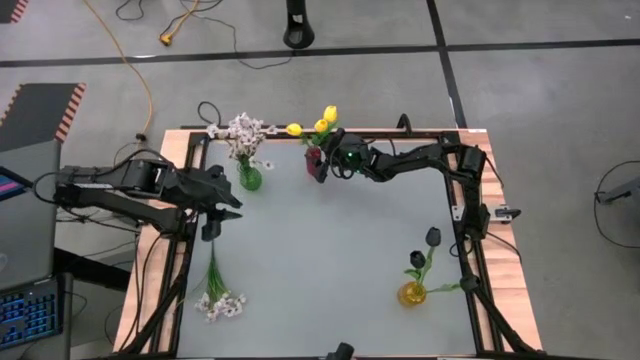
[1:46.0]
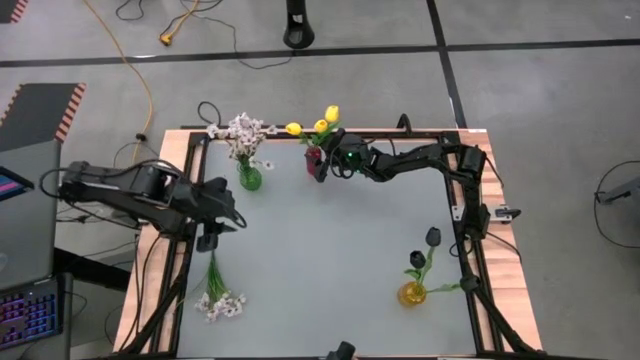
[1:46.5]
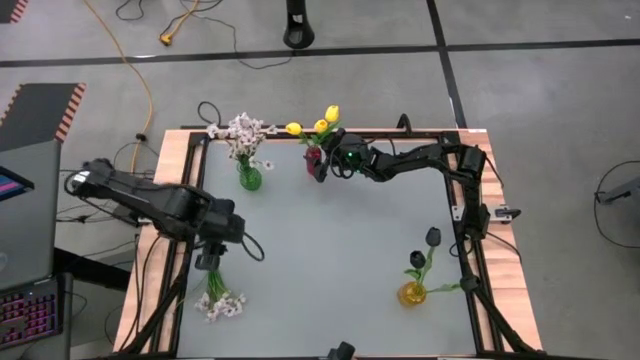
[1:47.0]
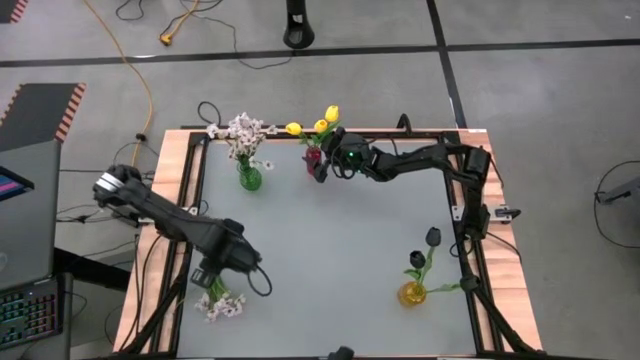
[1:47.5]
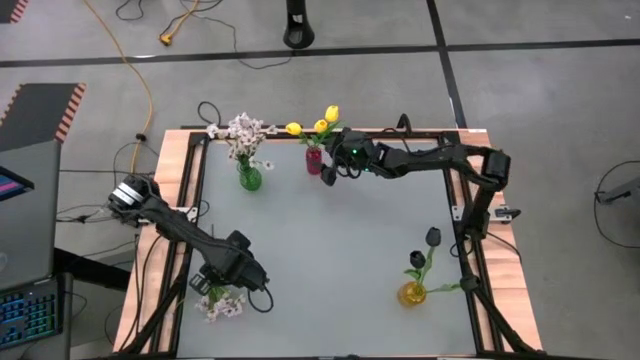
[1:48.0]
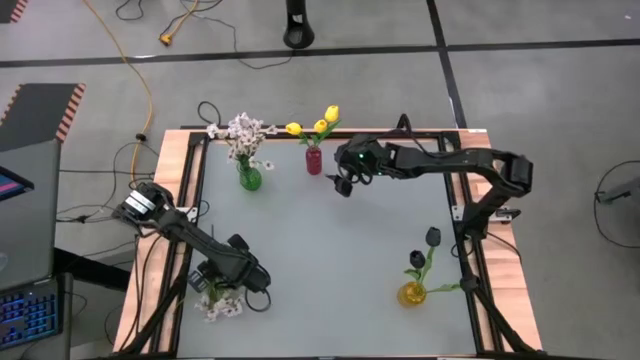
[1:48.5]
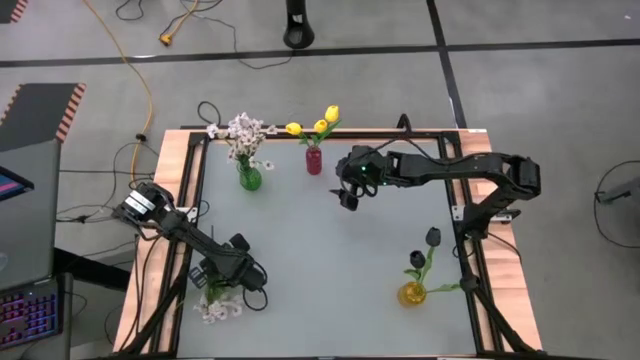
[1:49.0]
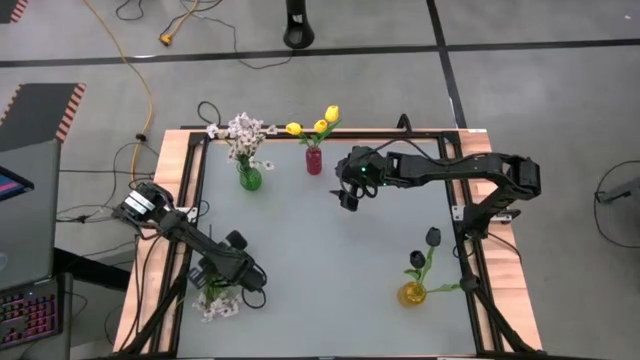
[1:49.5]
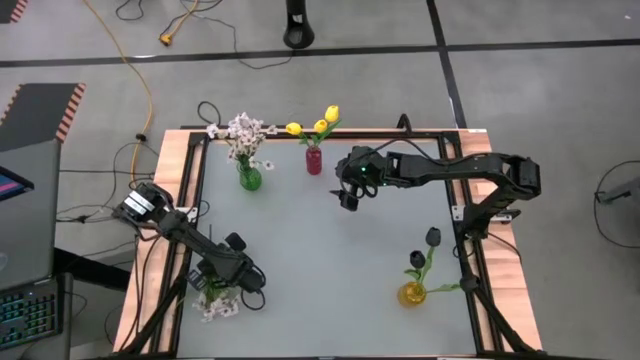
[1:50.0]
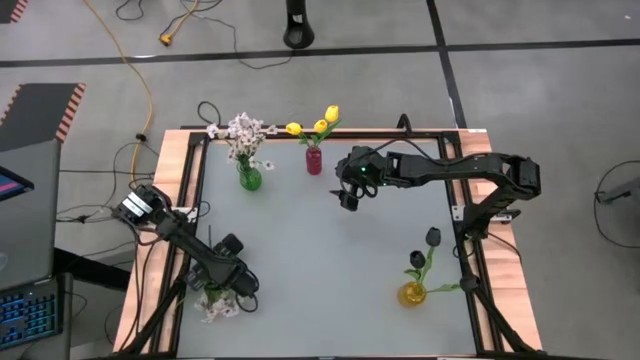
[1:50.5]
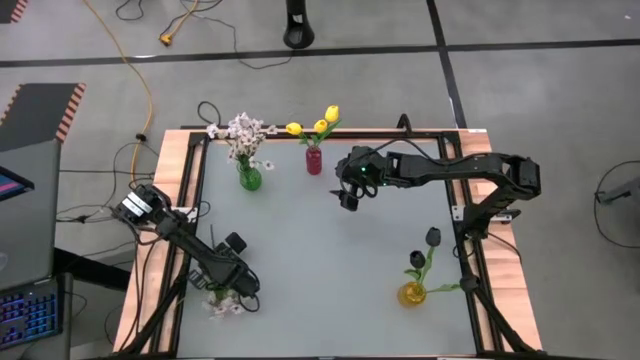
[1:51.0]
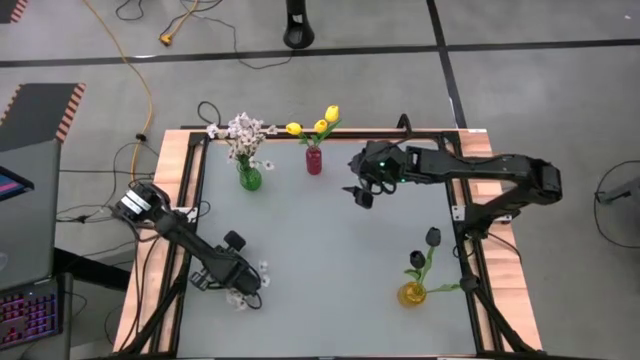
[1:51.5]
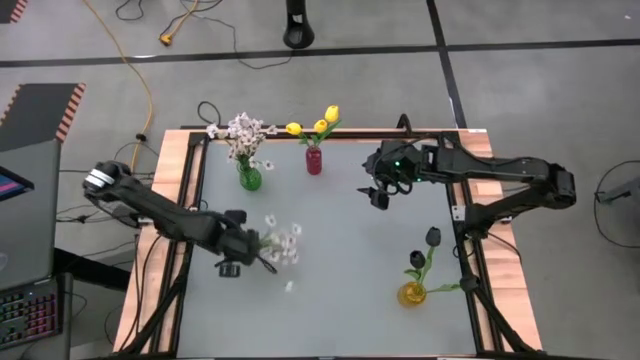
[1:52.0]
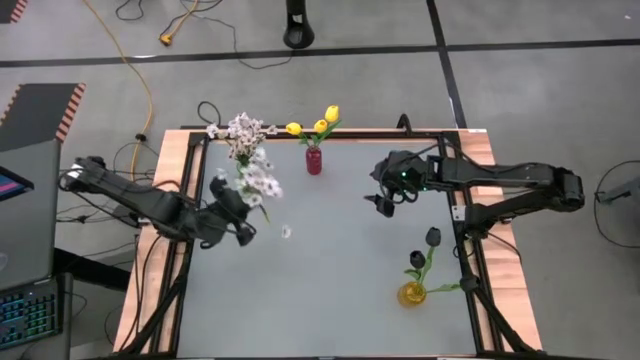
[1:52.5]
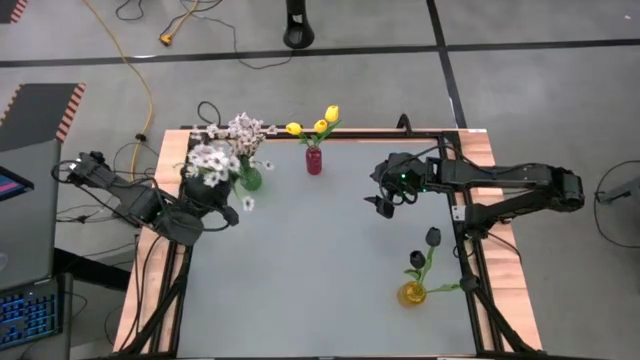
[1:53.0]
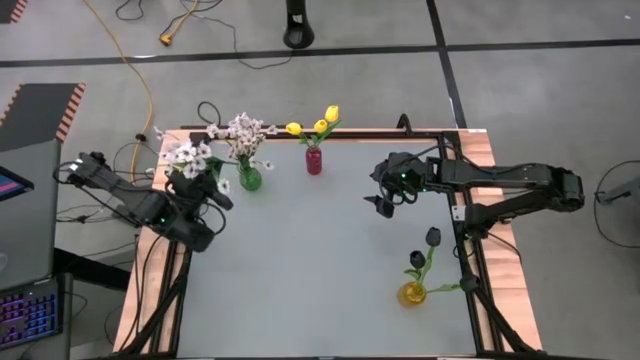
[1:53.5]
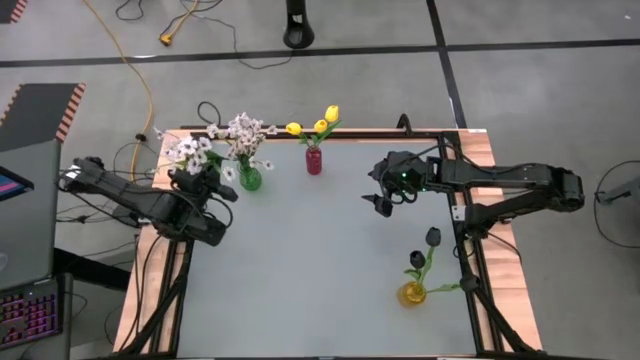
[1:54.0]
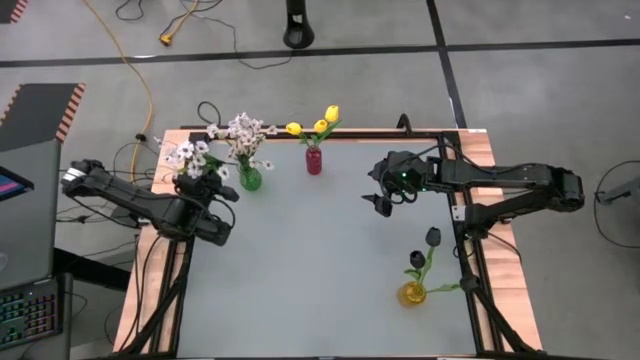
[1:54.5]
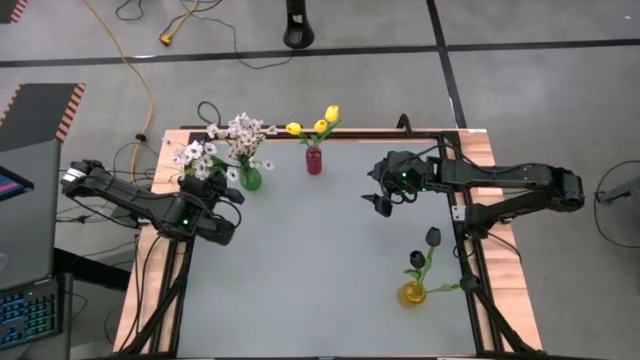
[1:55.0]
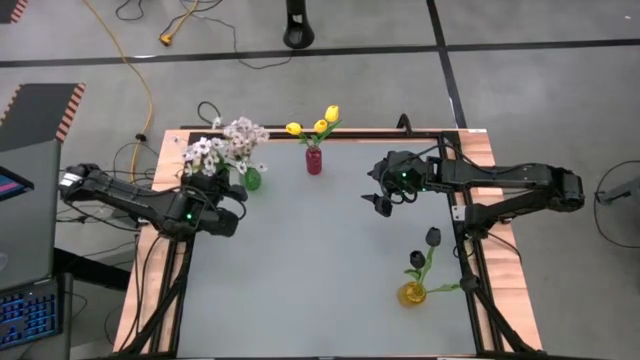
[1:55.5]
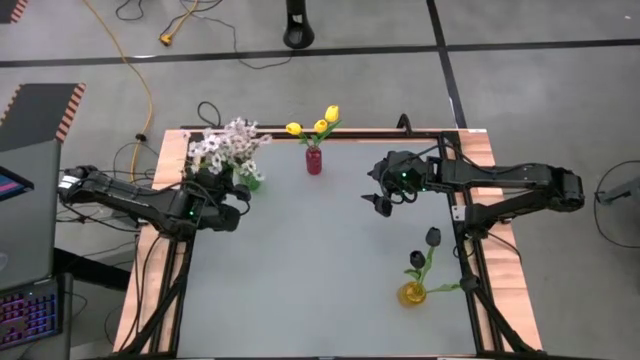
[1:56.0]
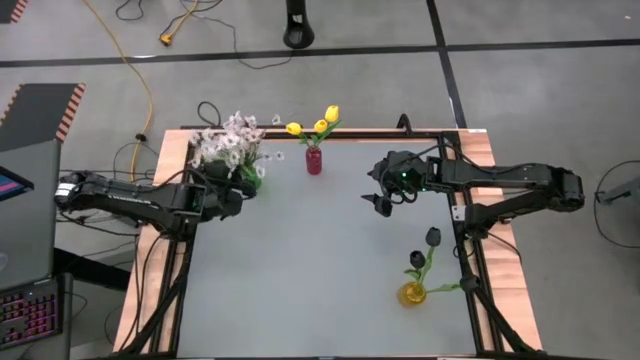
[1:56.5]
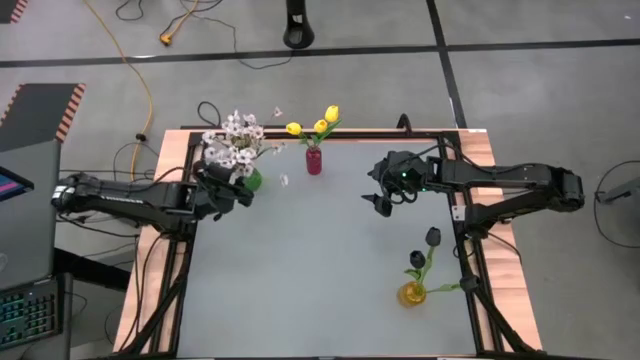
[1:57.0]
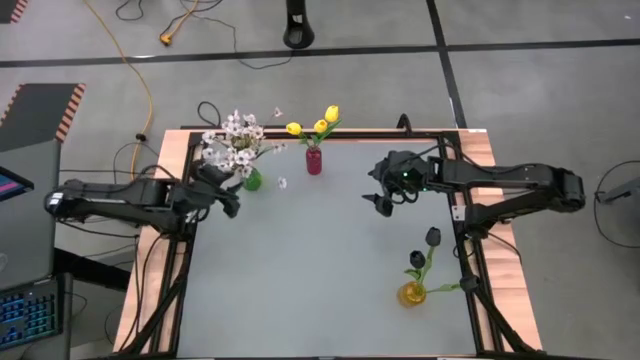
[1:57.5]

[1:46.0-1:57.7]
Task: Sort flowers into vase by color
Put the white flowers into the green vase

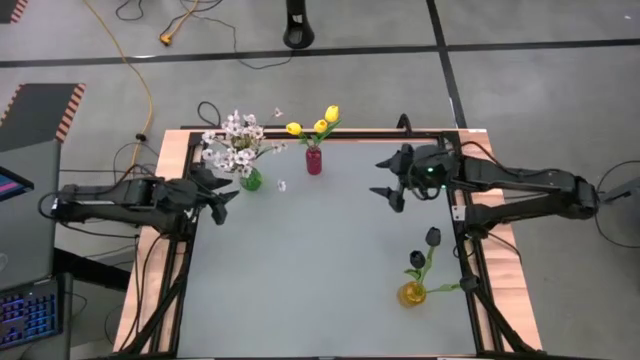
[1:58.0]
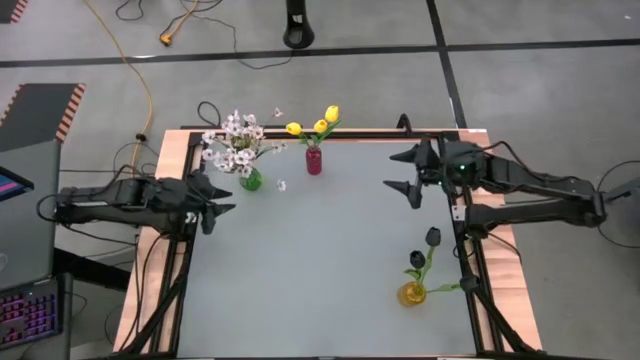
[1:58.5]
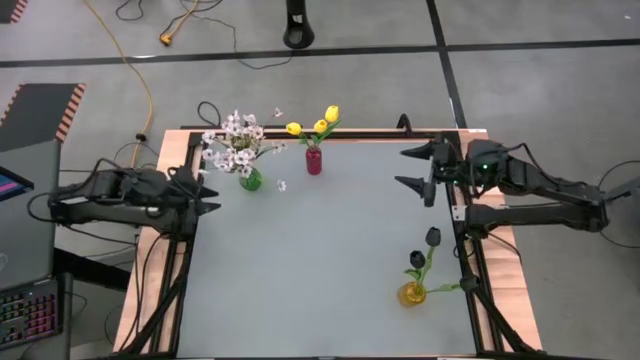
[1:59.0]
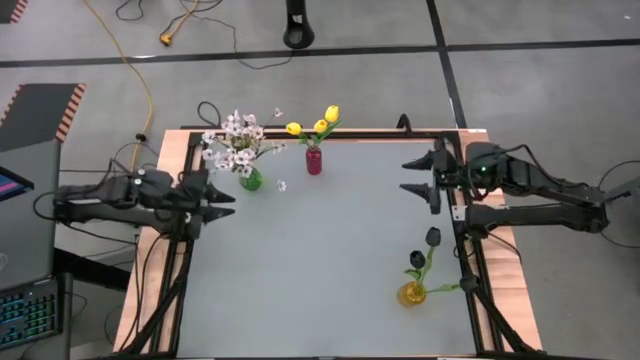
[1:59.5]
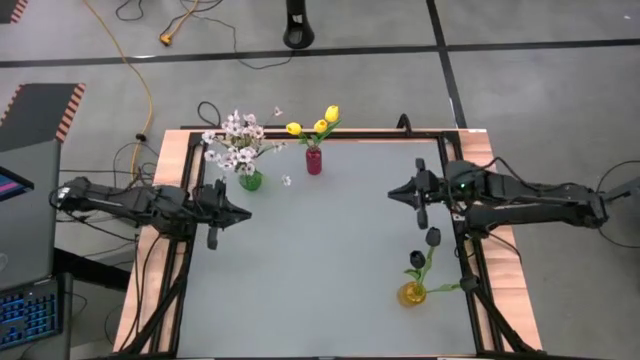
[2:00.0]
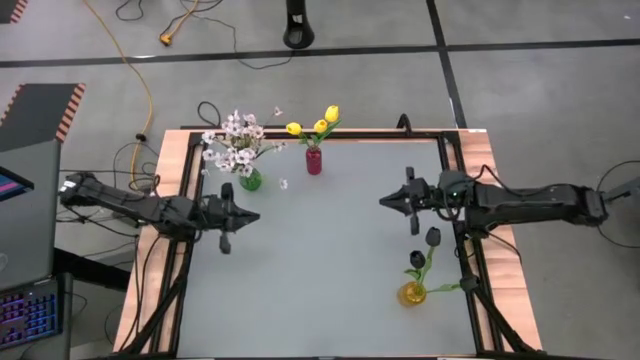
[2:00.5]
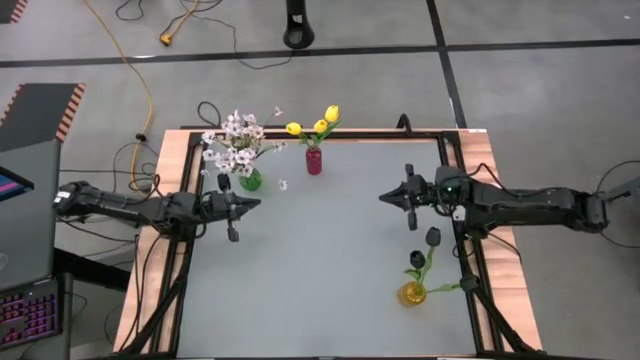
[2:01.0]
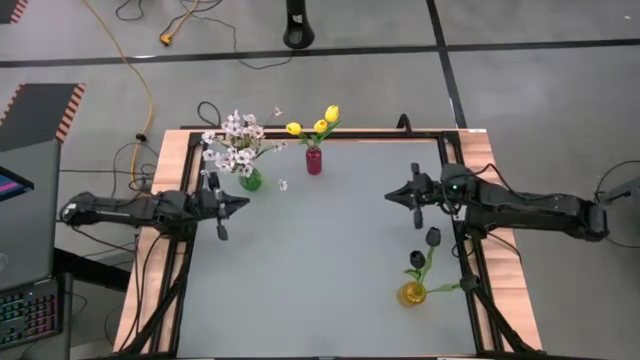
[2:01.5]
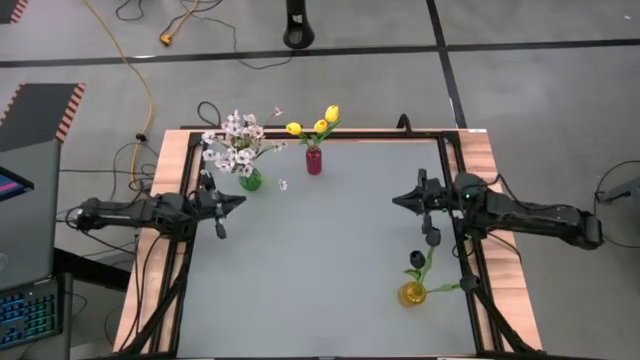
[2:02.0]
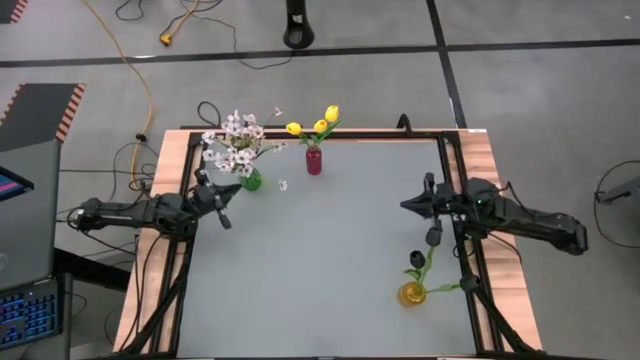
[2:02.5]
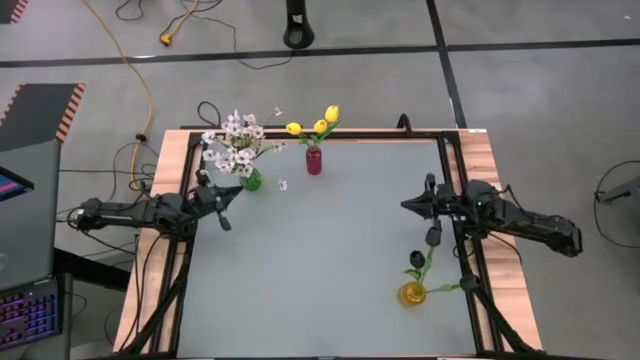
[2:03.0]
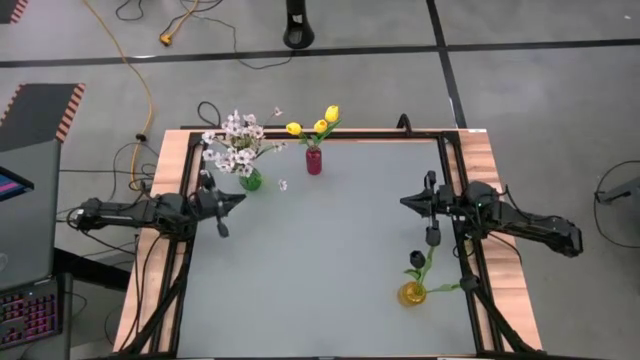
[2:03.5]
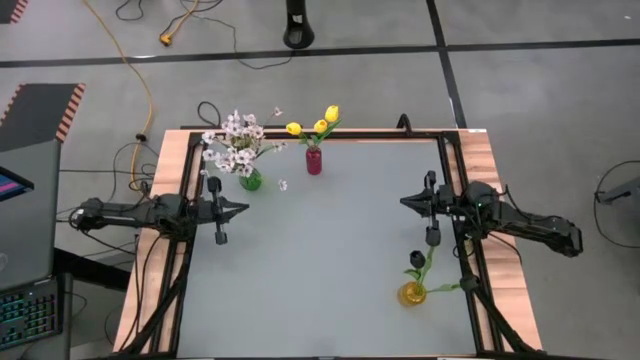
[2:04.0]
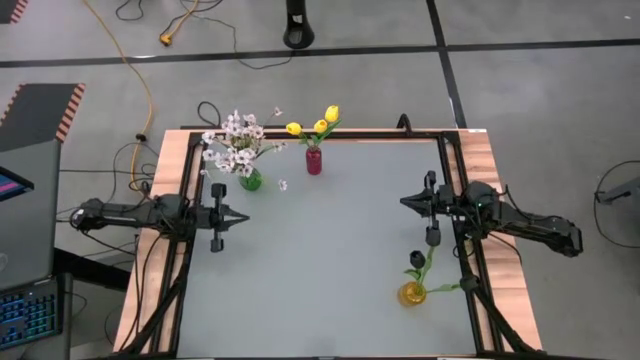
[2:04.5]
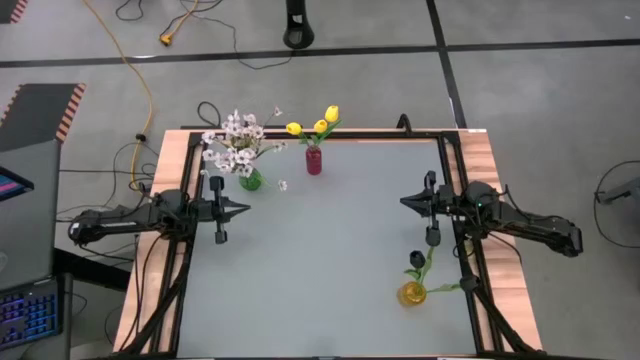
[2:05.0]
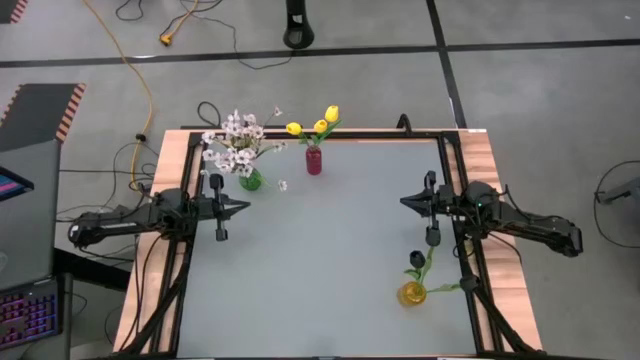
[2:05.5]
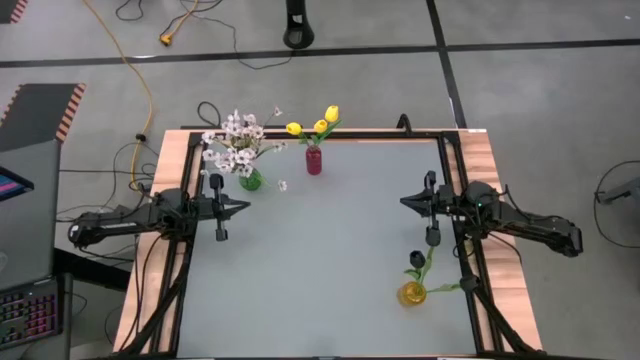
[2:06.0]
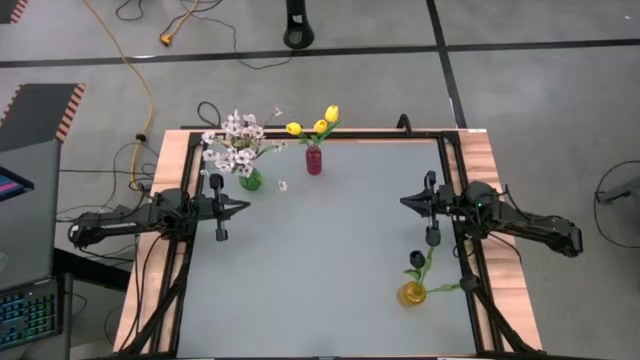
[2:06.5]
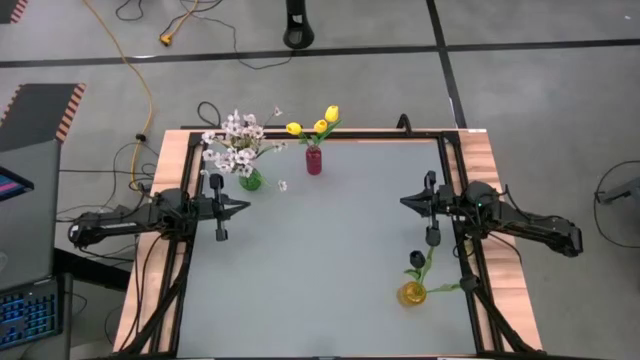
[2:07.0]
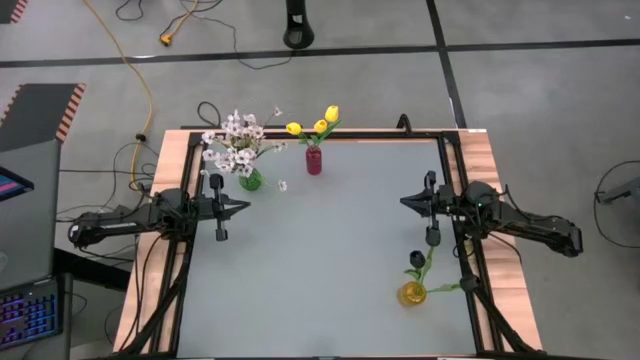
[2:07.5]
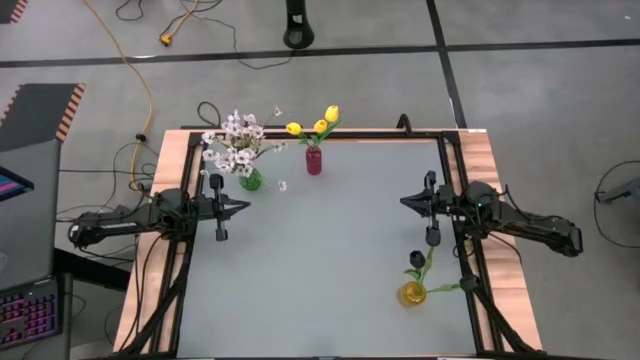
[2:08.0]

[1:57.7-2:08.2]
Return to Home Position
